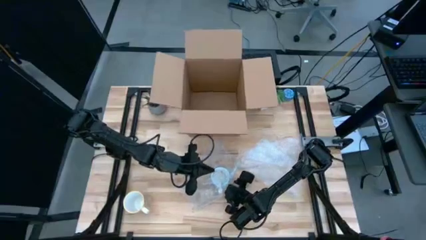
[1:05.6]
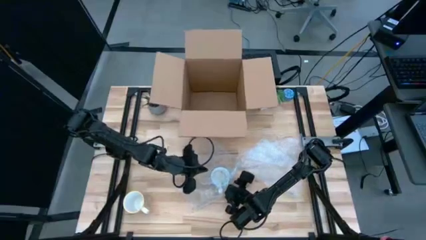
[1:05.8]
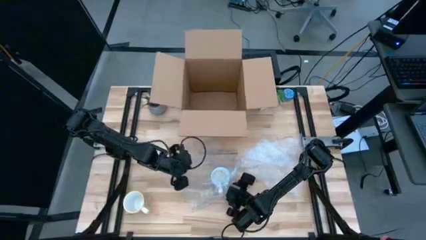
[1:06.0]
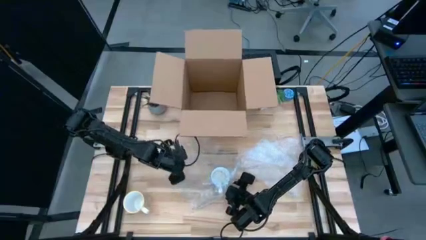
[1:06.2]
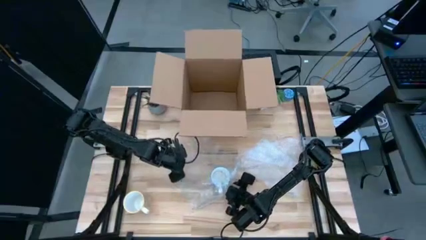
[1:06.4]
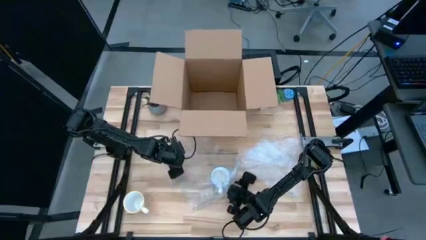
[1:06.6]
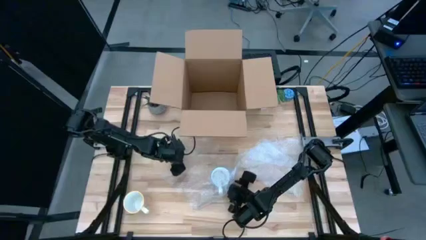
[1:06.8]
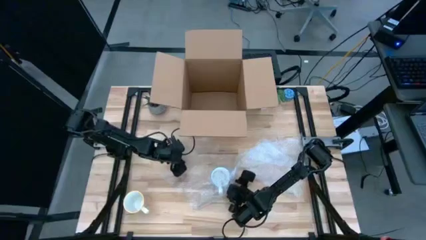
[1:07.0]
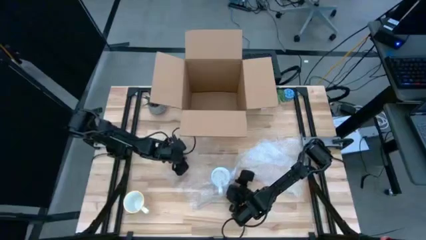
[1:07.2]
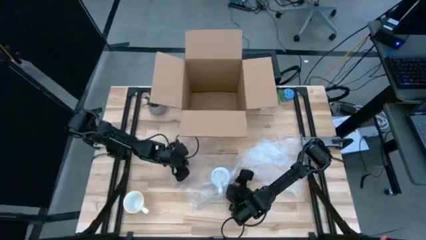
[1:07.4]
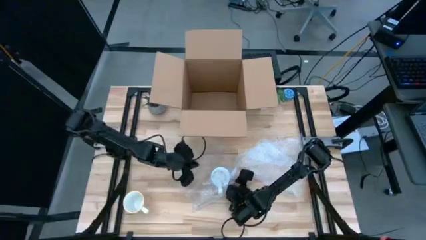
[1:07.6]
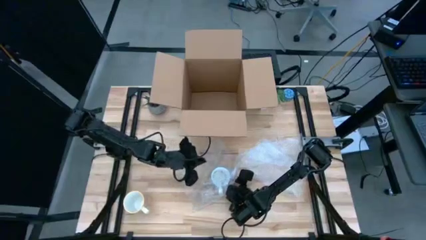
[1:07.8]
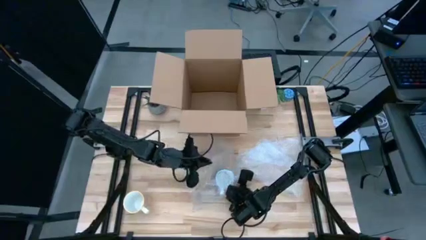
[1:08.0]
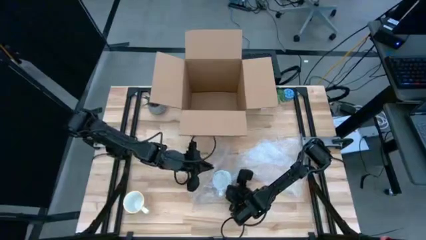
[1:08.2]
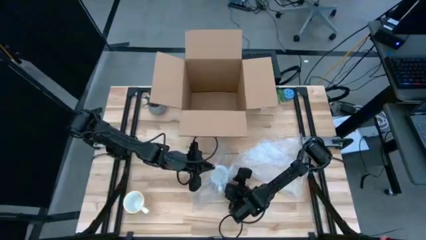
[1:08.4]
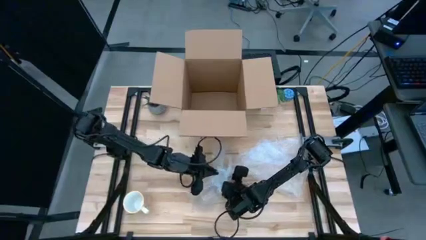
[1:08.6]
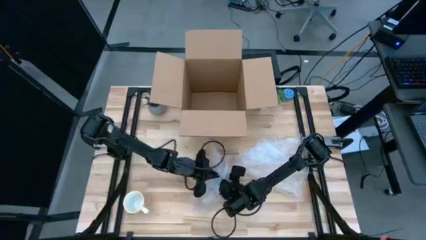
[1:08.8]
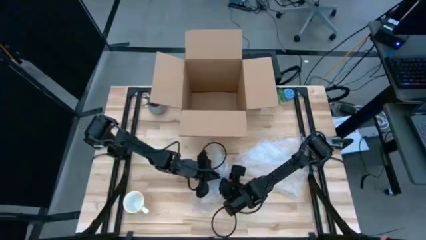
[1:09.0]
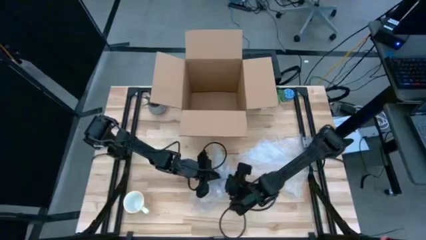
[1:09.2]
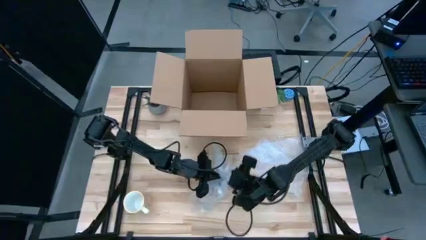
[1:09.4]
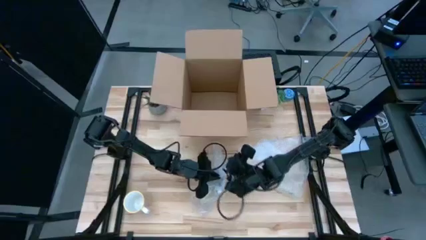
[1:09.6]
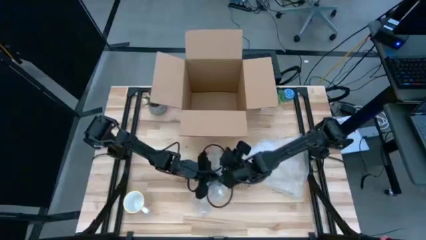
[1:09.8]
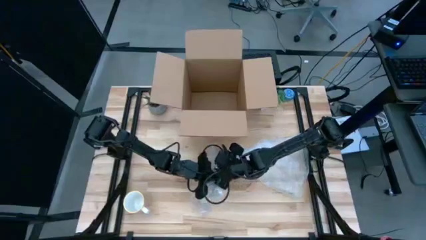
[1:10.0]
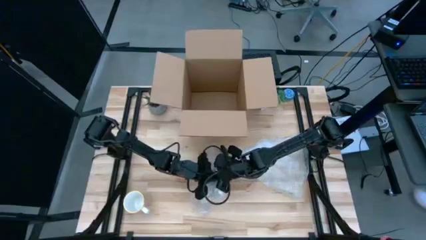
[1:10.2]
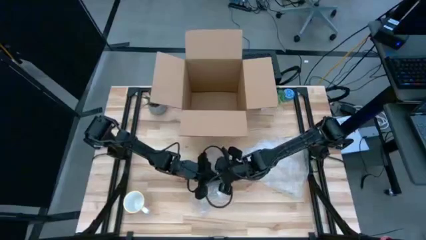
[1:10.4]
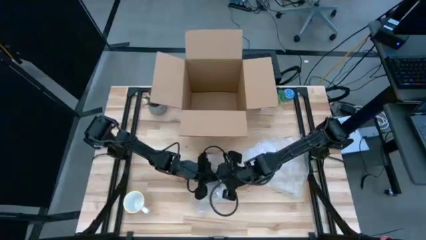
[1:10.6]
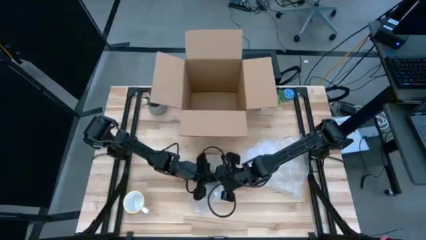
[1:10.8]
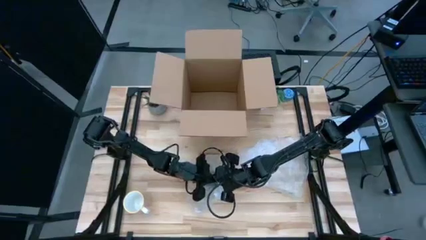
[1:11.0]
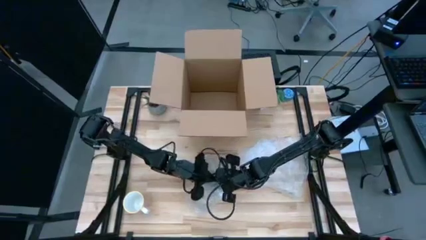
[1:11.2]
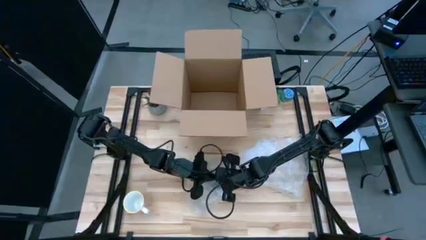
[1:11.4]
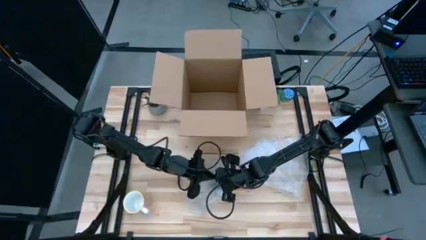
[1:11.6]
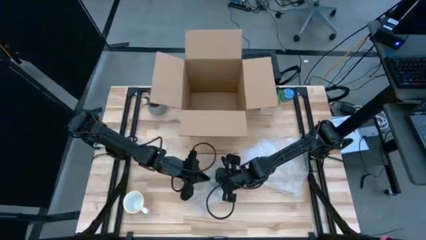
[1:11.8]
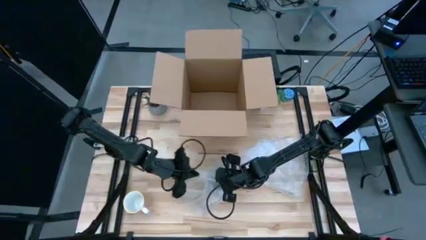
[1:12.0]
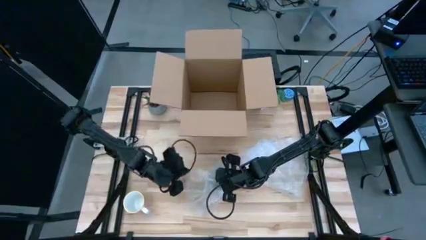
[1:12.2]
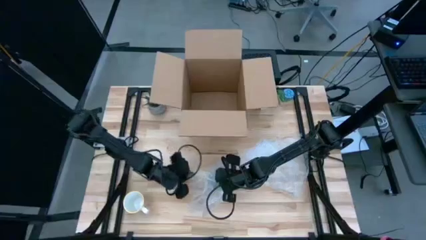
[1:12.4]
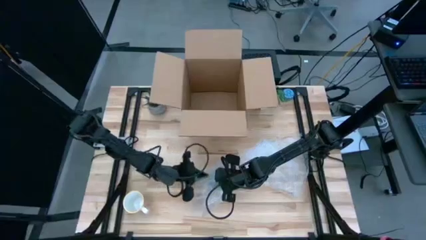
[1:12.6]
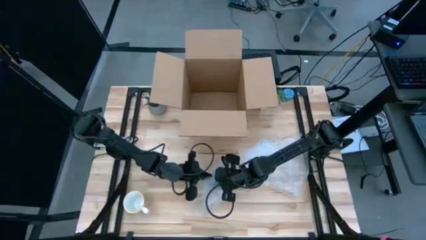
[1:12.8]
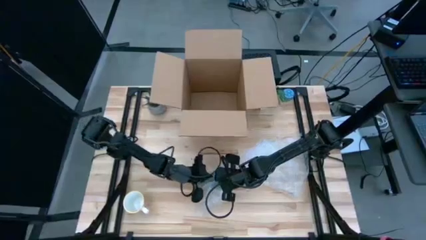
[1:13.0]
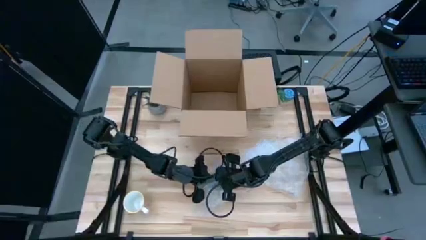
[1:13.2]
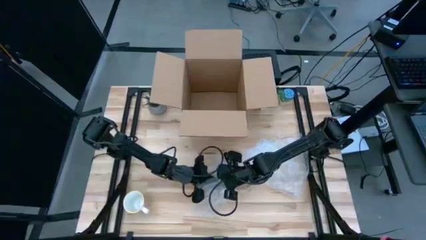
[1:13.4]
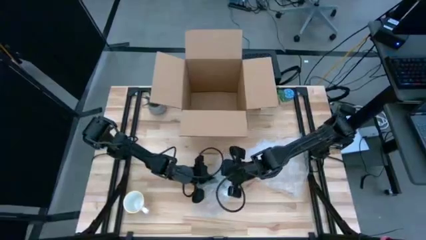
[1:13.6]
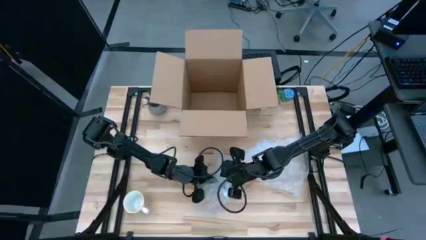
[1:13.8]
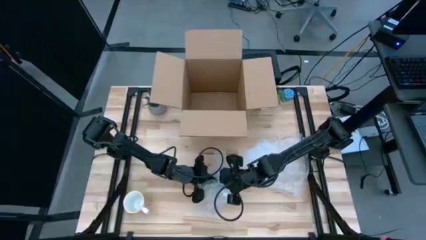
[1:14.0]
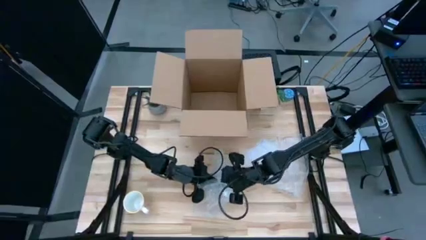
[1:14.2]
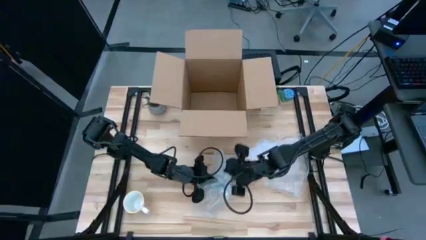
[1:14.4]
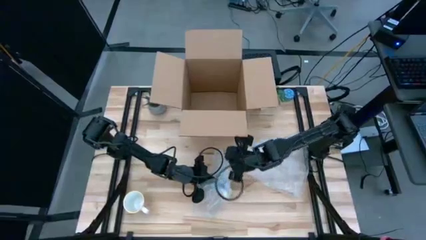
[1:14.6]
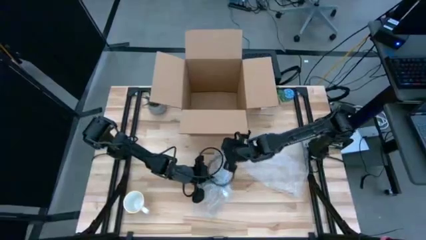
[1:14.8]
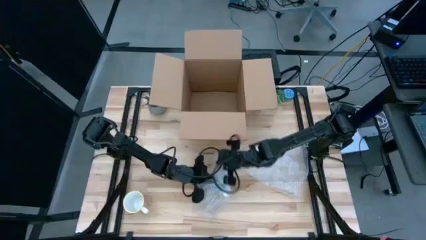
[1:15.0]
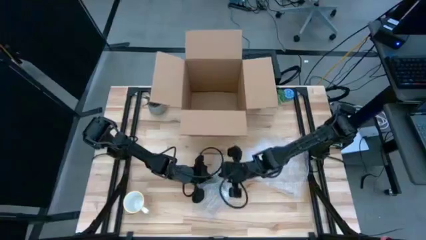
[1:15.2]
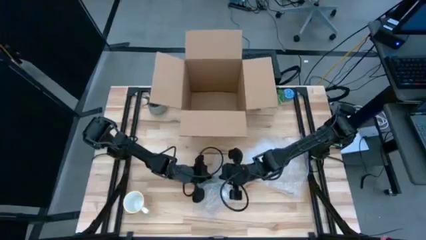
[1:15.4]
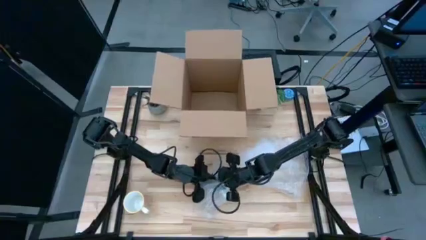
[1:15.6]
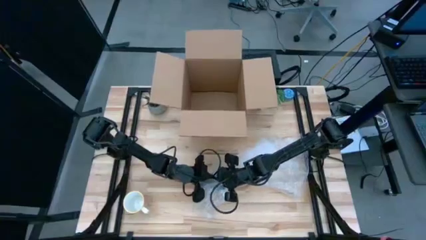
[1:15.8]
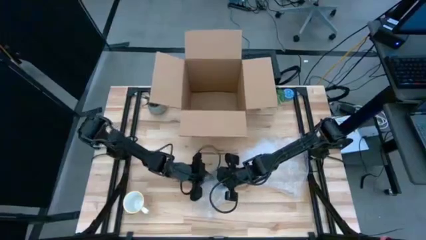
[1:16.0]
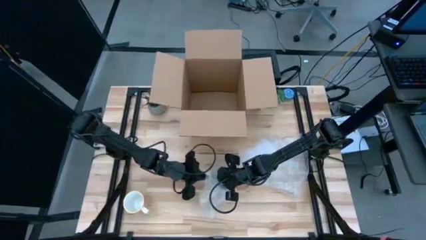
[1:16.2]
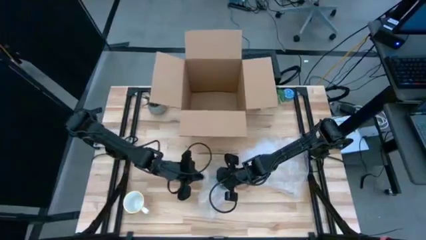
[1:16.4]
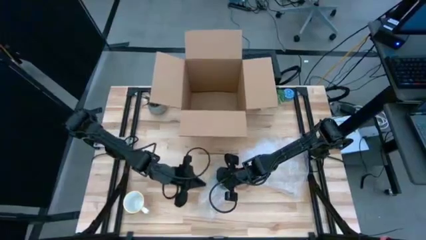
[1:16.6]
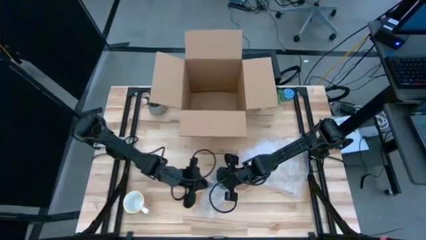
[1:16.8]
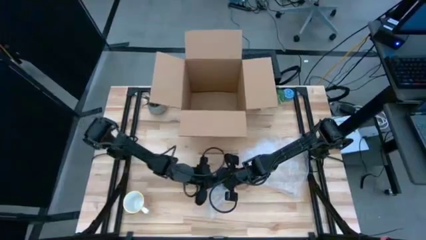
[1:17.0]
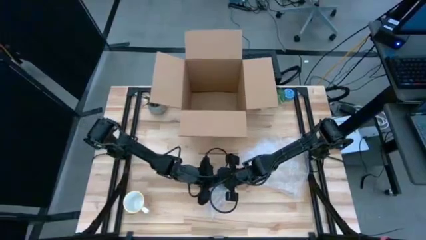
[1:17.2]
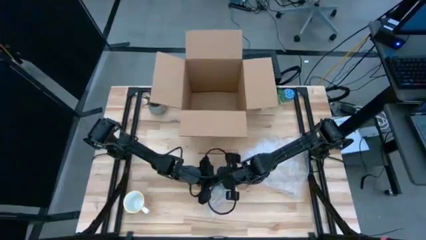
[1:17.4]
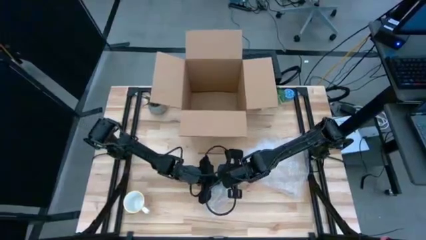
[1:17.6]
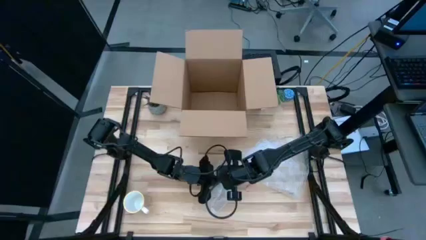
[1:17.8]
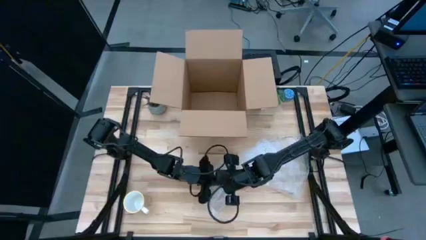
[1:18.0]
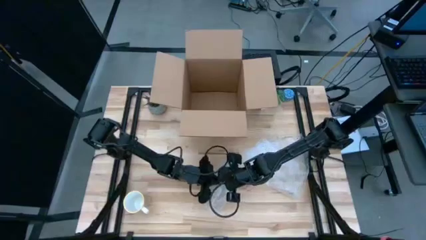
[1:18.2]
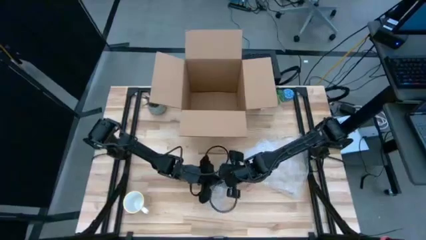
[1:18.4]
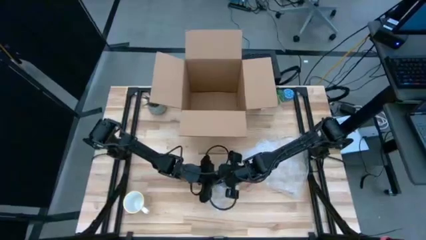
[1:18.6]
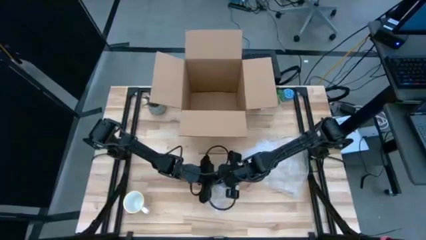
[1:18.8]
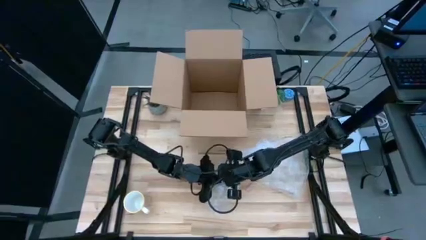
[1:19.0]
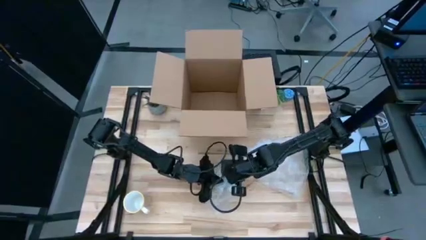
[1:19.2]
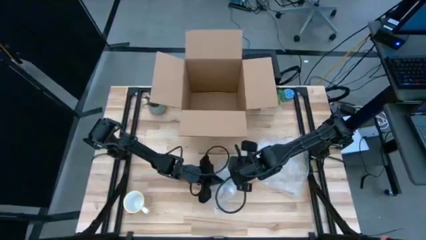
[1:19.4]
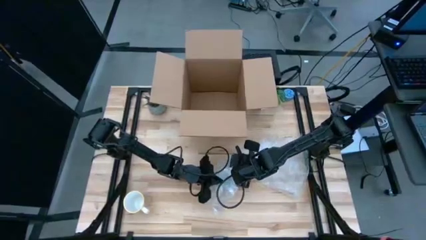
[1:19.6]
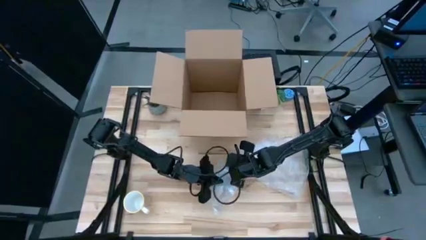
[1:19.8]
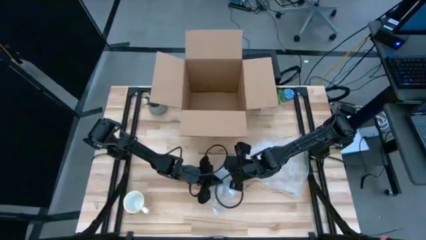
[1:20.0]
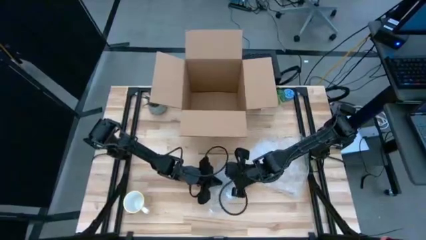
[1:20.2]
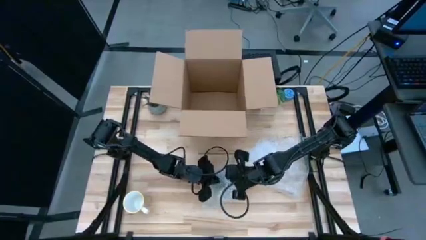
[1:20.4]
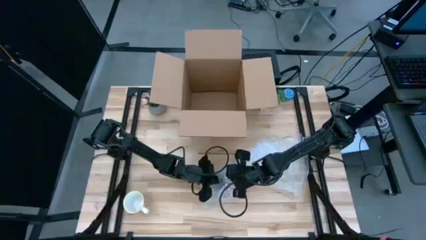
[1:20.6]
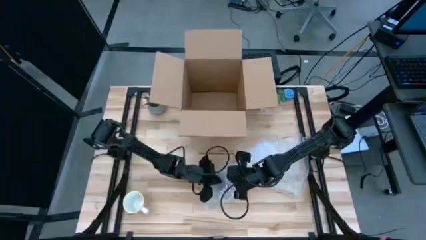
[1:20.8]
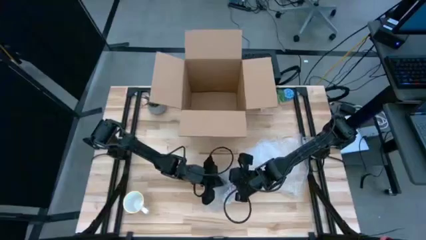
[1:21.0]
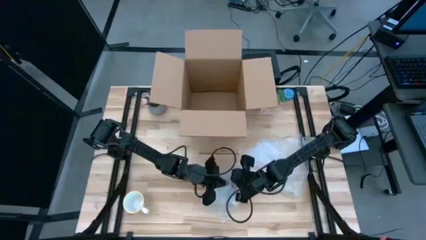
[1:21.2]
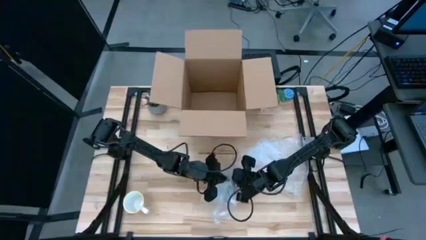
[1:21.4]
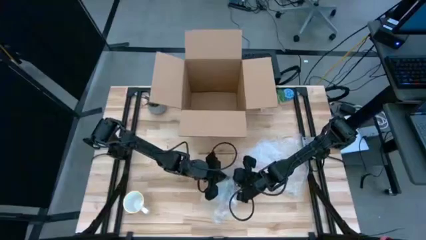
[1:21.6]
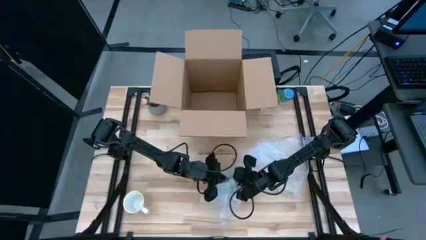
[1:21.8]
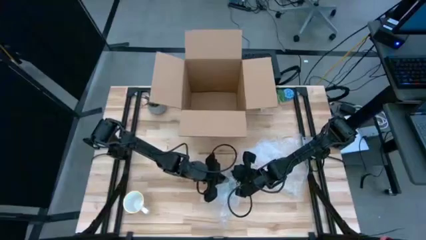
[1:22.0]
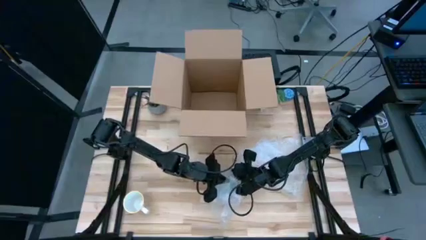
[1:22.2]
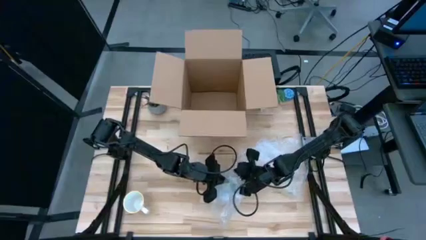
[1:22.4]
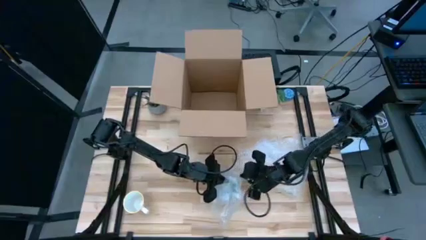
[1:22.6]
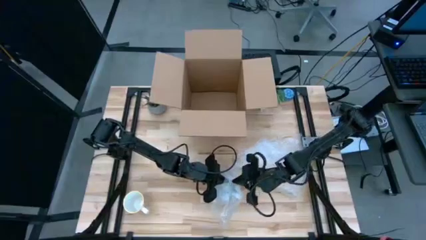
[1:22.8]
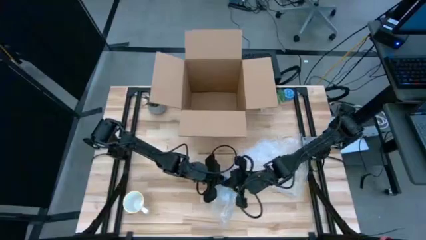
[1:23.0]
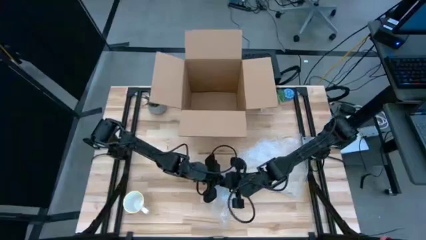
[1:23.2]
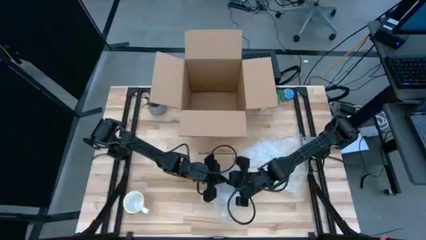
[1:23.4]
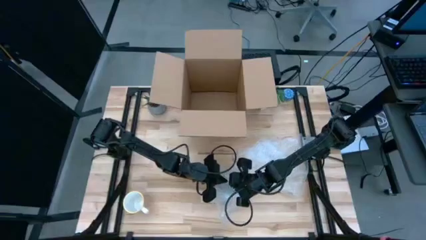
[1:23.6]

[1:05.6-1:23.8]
Task: wrap mug
Wrap the red mug with bubble wrap
